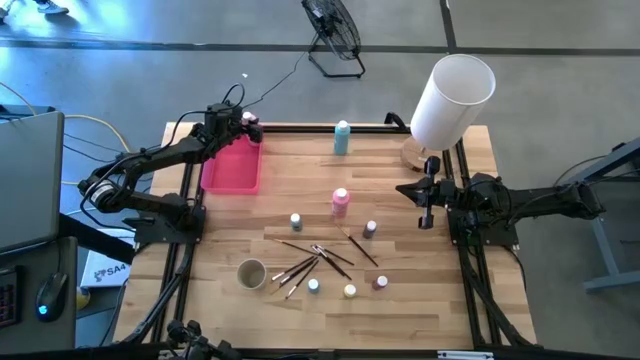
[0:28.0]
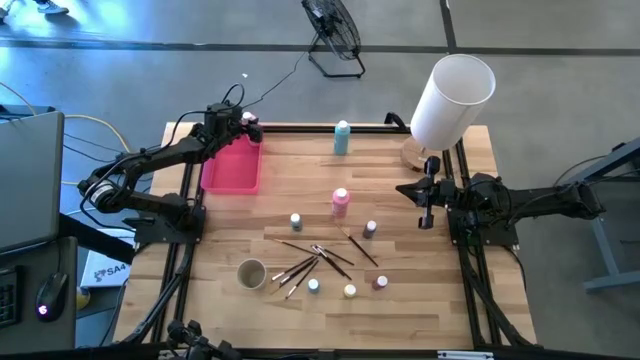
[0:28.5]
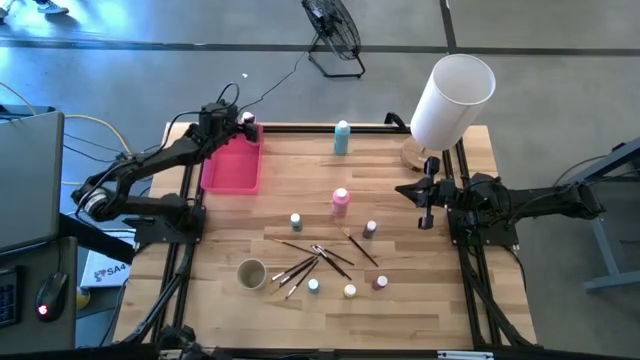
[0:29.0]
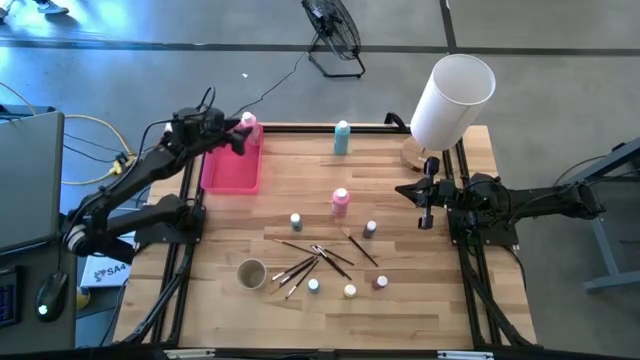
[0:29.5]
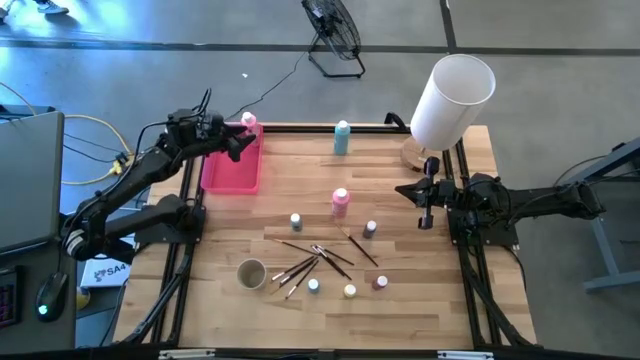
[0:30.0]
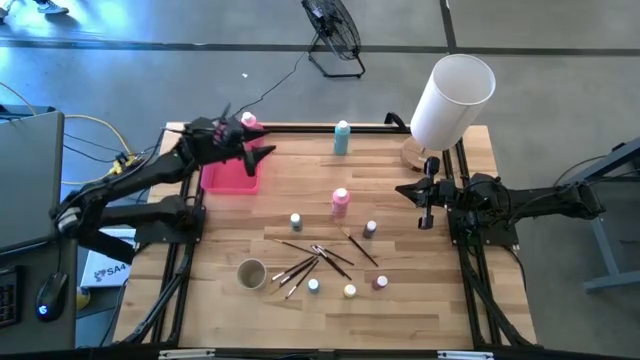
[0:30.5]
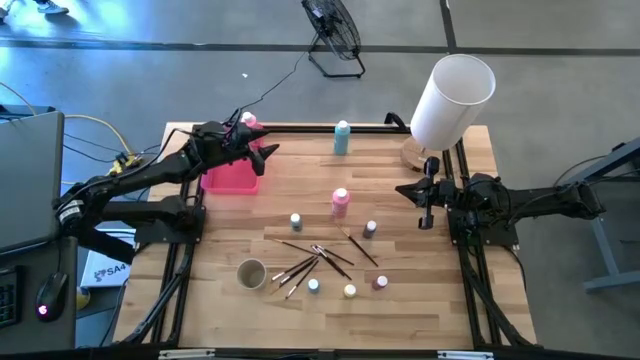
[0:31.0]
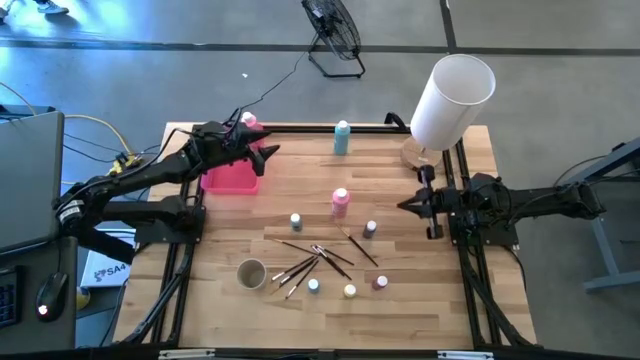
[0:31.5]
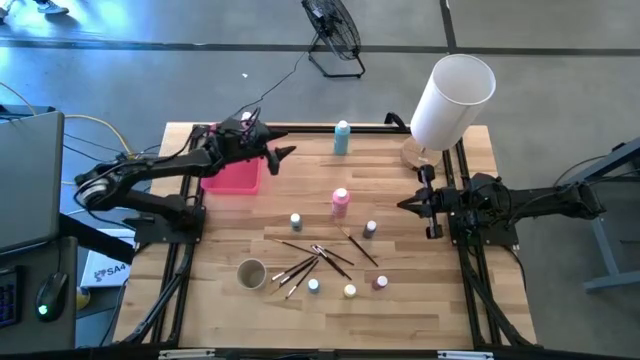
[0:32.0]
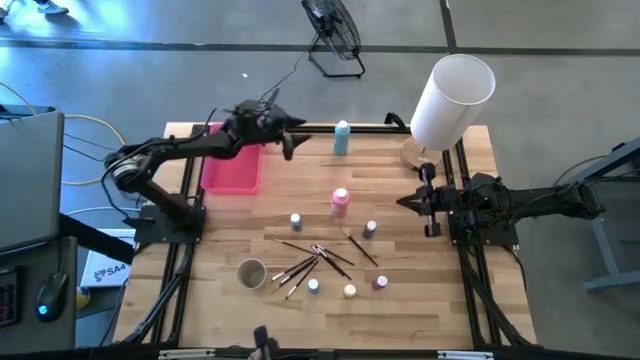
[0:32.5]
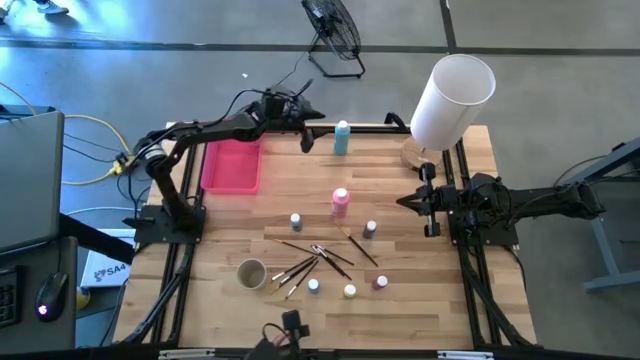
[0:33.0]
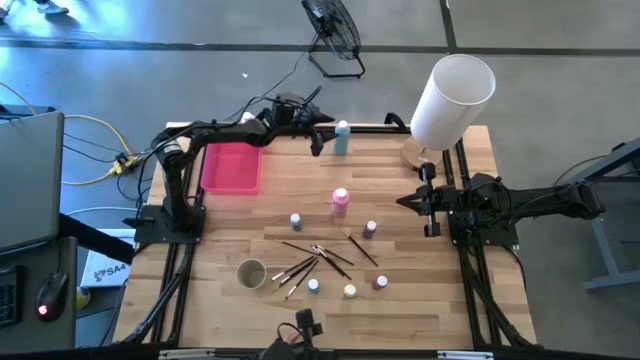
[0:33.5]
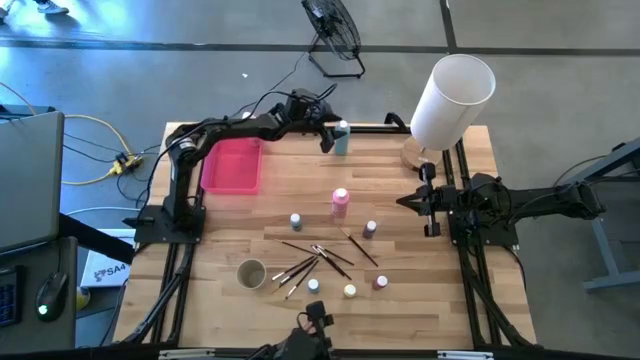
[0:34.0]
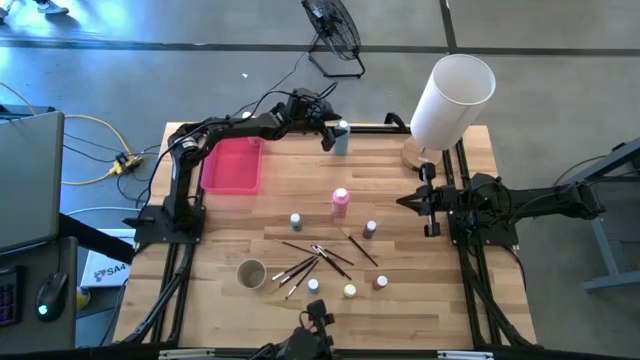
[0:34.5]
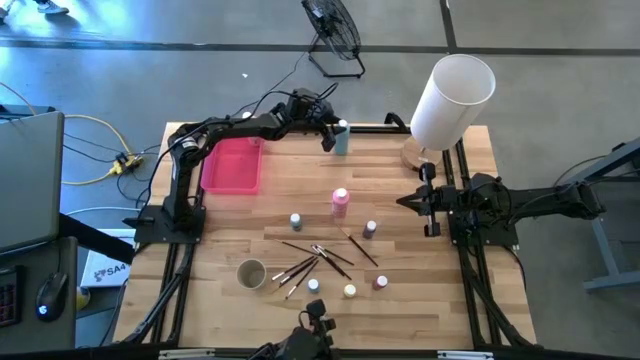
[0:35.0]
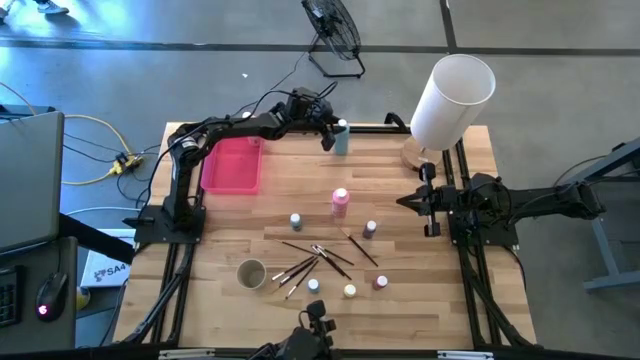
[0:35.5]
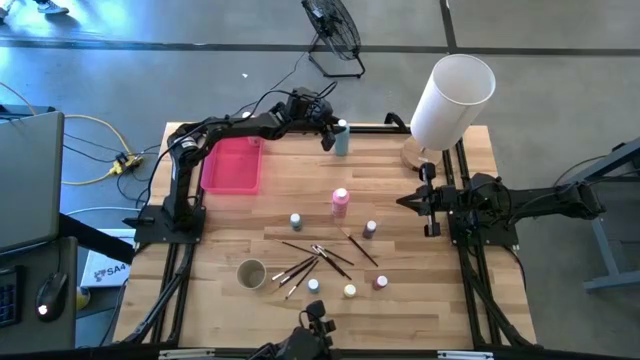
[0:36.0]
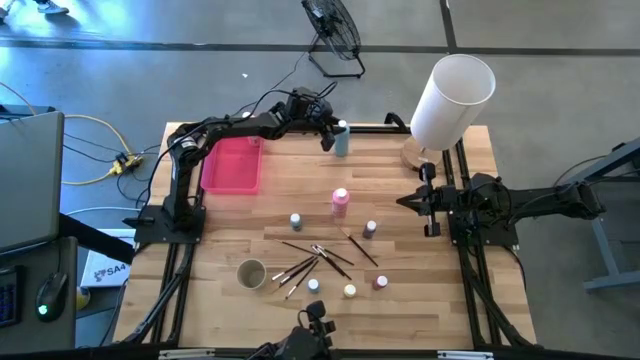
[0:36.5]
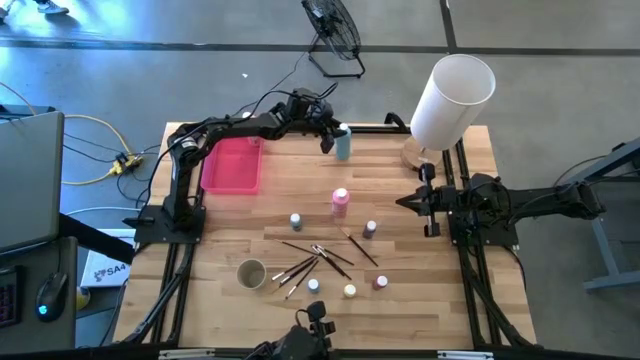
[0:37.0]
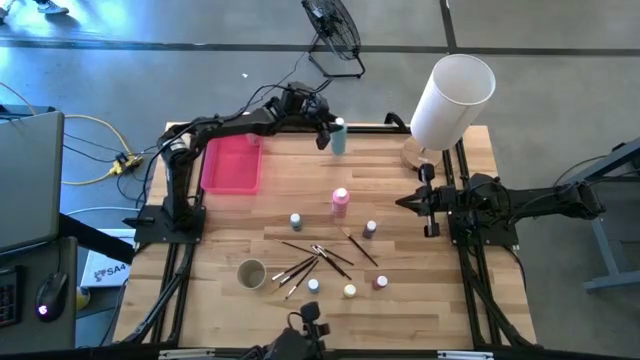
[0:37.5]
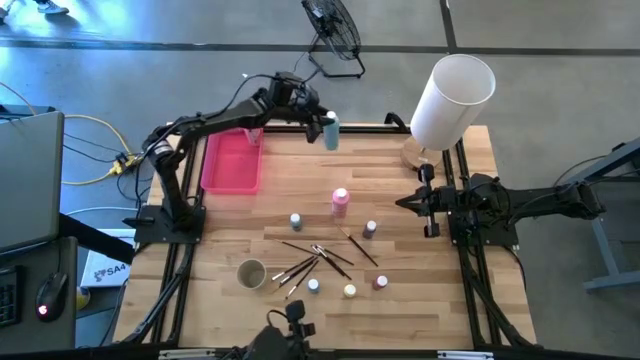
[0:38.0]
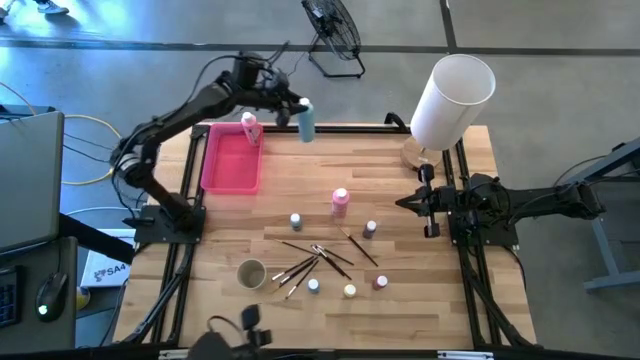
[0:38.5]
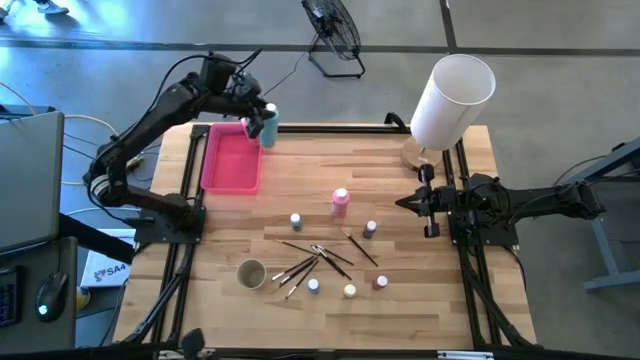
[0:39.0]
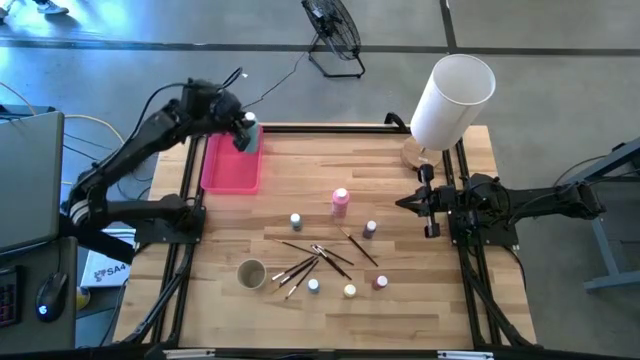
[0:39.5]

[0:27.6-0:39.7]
Task: Pick & Place Paint Supplies
Put the big light blue paint bottle into the pink bin

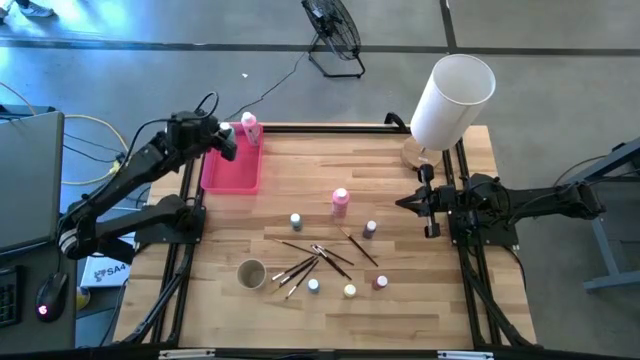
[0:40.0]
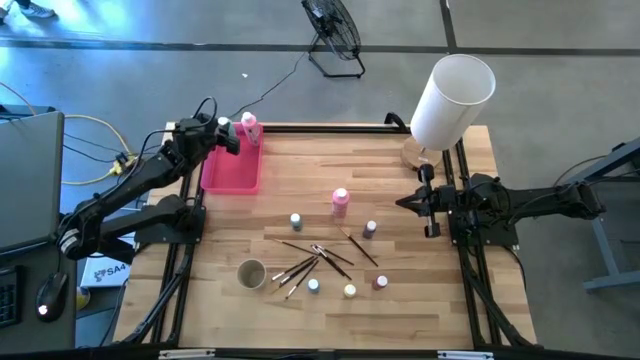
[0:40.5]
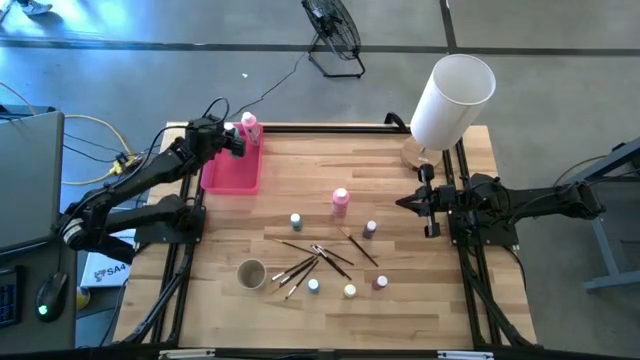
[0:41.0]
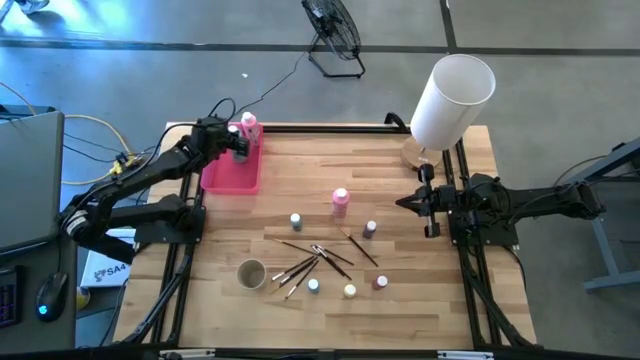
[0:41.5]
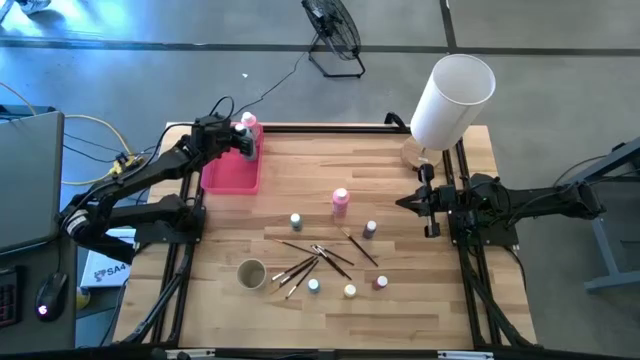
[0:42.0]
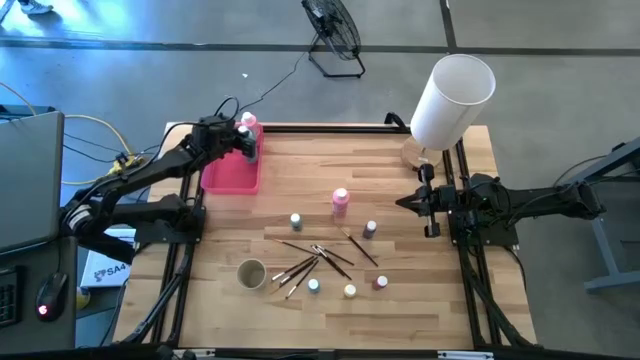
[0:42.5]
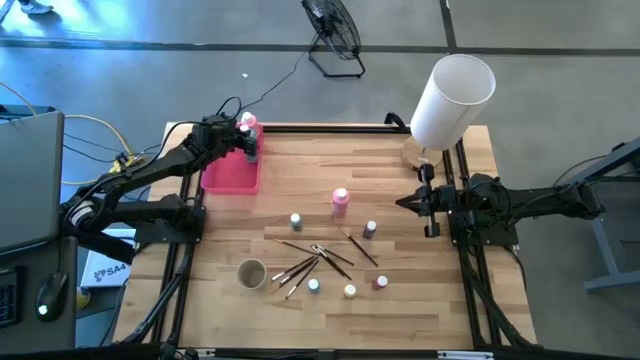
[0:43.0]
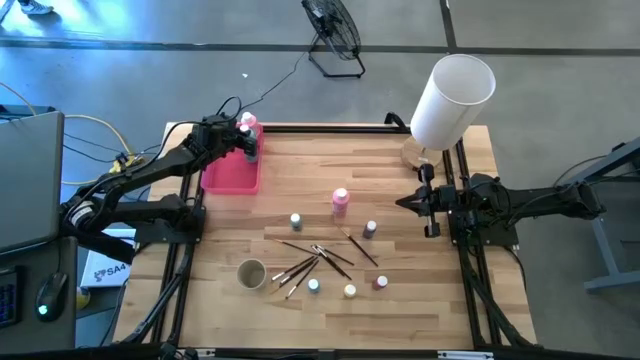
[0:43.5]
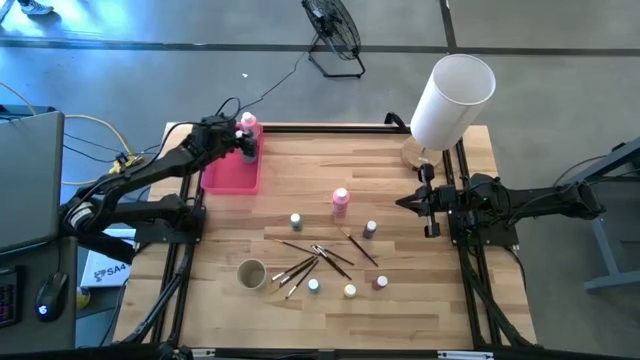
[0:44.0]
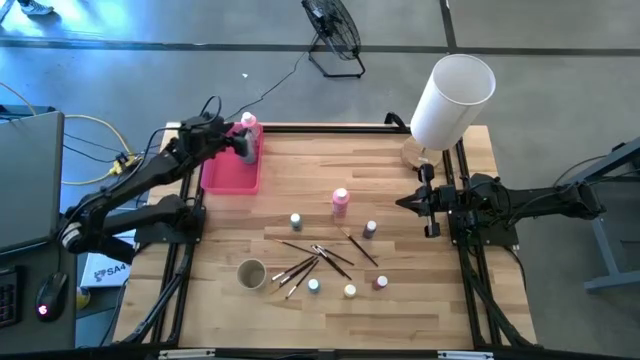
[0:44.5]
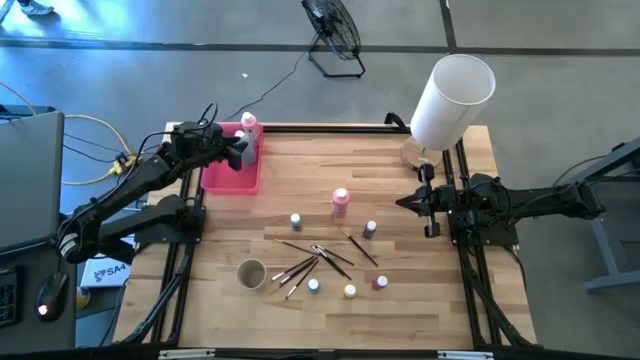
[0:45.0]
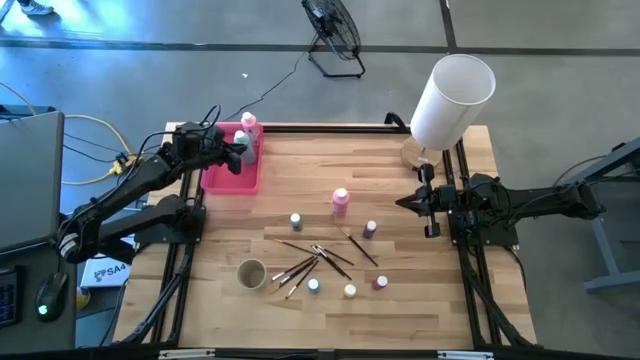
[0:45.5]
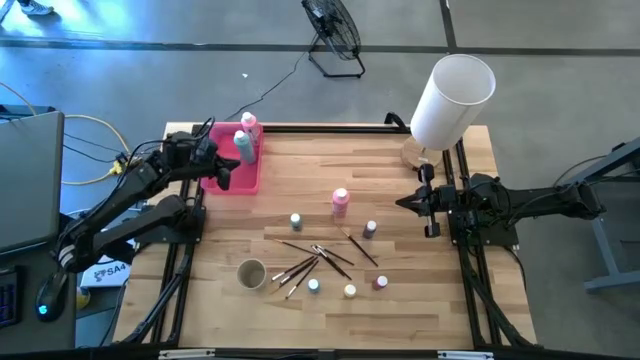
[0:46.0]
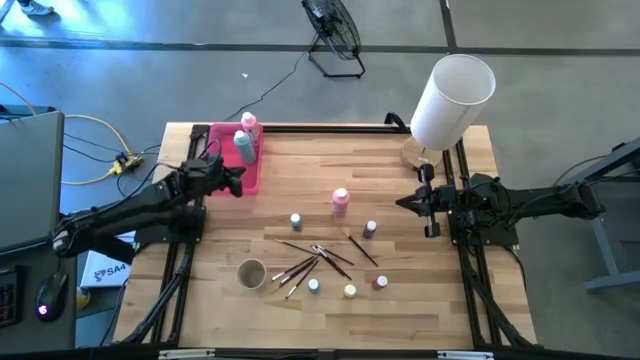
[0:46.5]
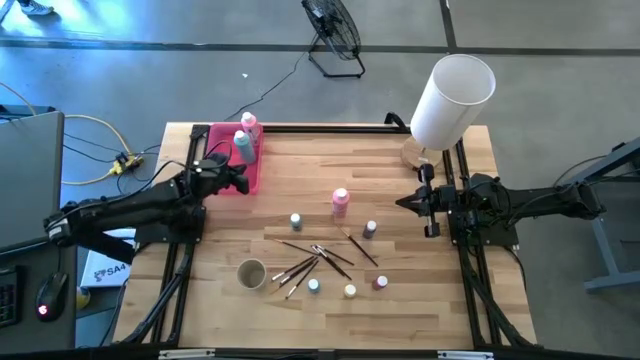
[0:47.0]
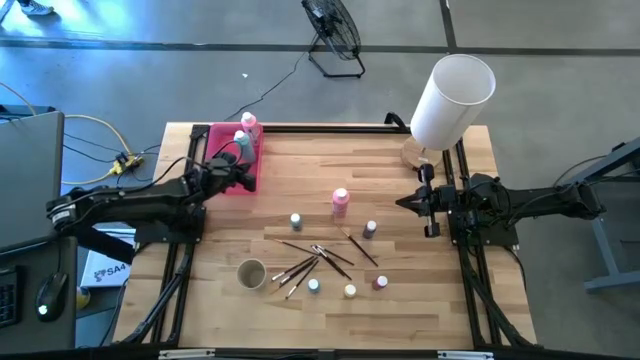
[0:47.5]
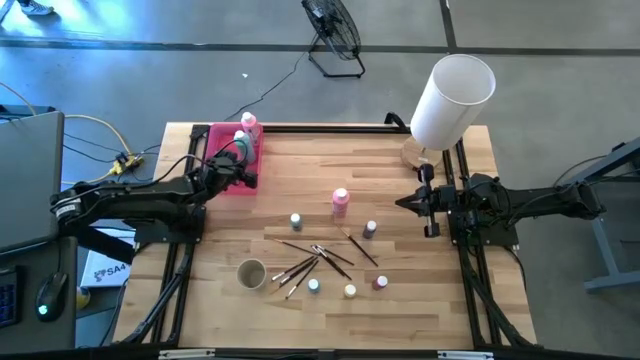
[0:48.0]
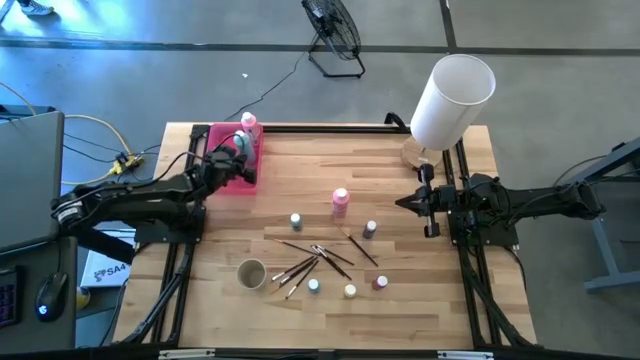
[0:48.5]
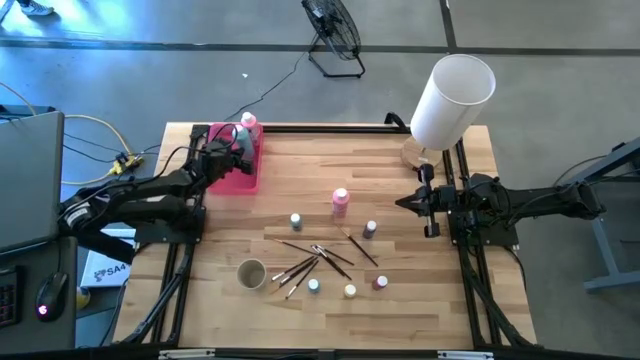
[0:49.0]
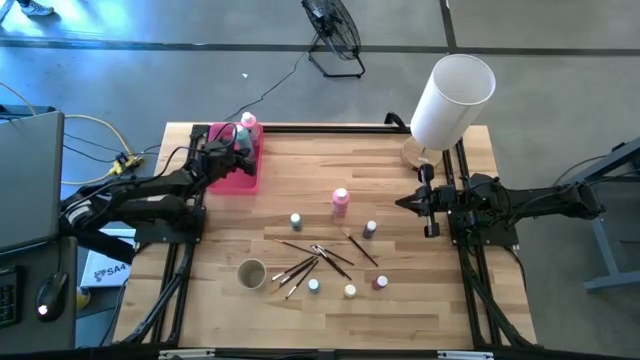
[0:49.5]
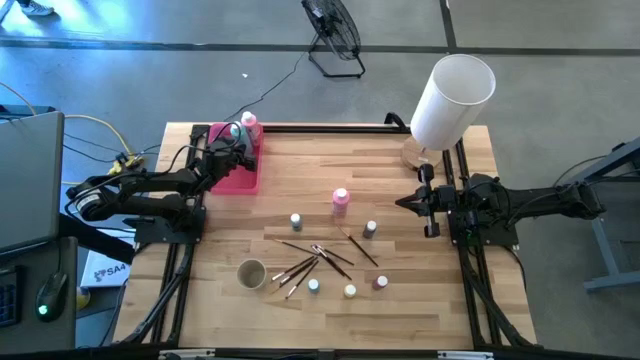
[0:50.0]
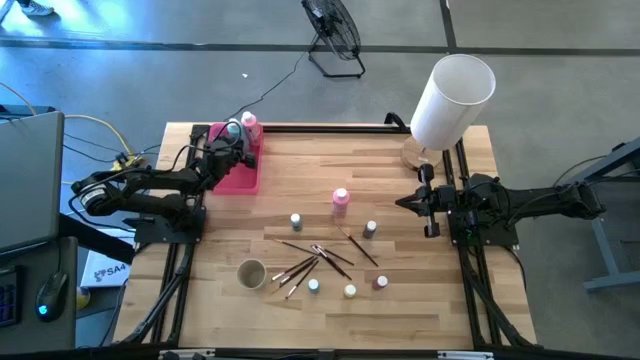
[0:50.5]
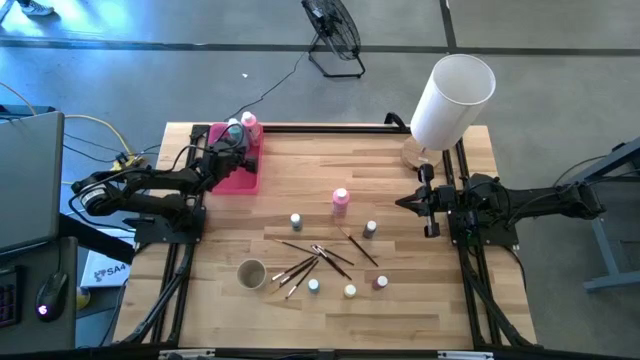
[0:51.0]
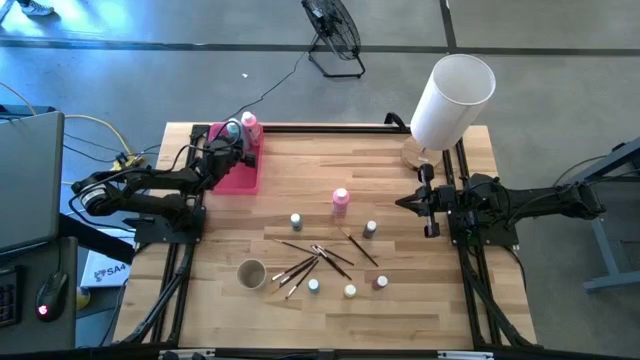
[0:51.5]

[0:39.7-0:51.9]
Put the big light blue paint bottle into the pink bin
